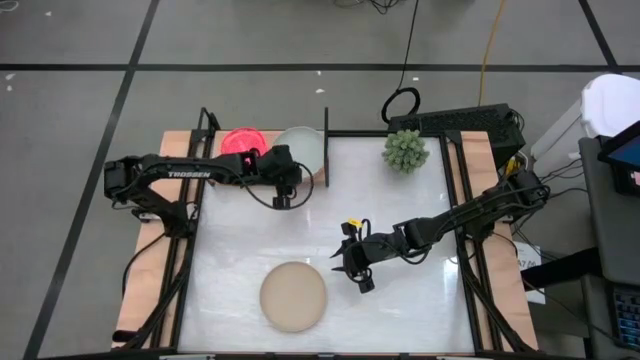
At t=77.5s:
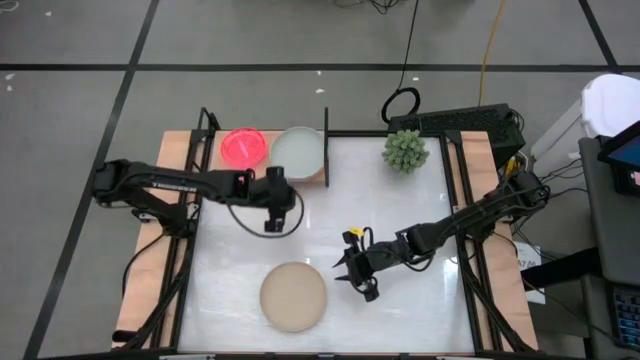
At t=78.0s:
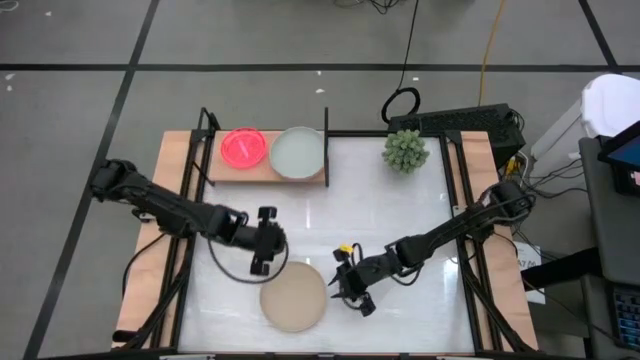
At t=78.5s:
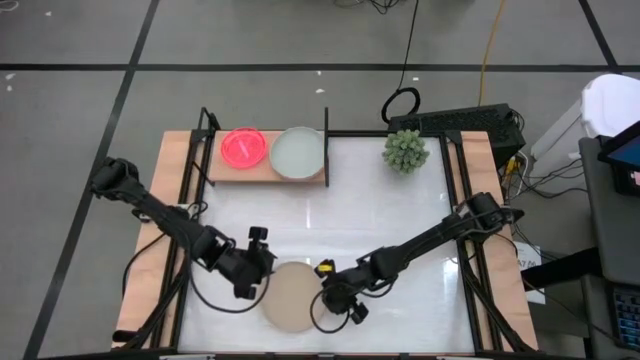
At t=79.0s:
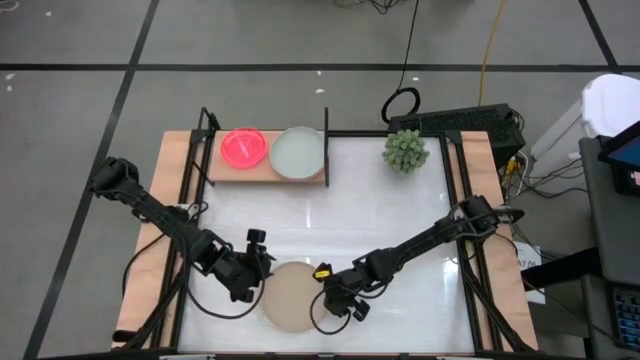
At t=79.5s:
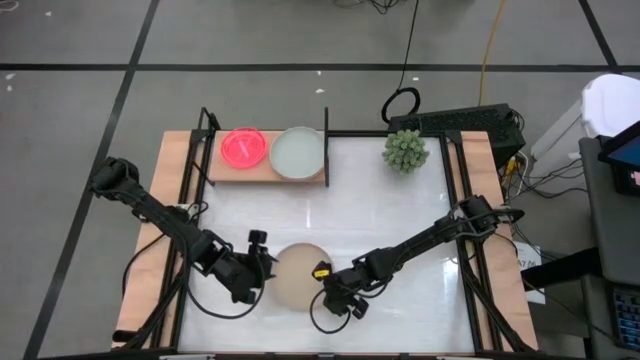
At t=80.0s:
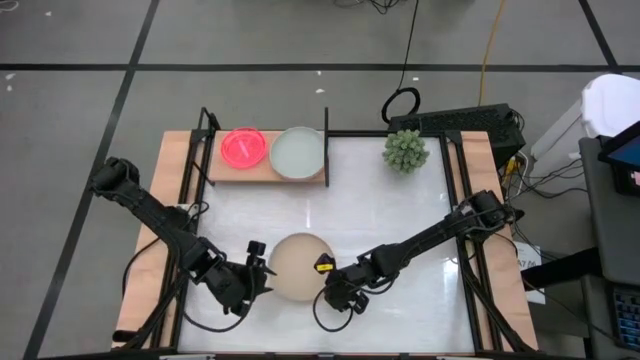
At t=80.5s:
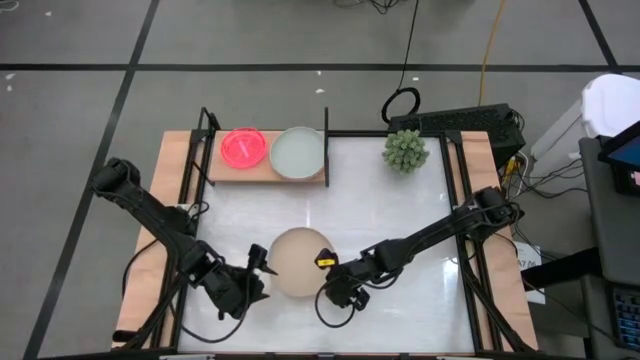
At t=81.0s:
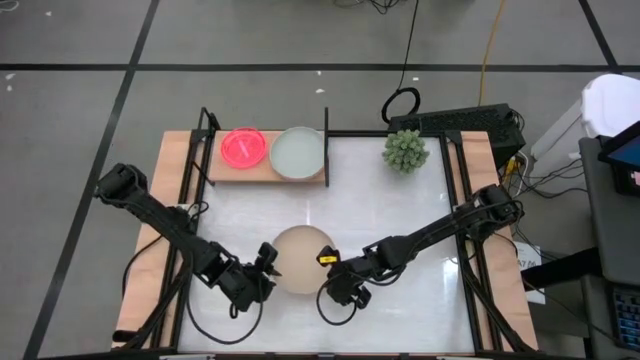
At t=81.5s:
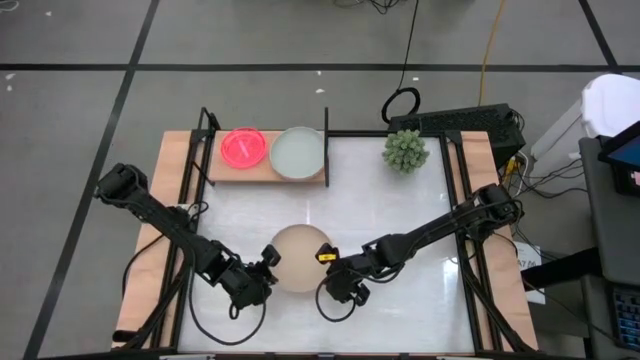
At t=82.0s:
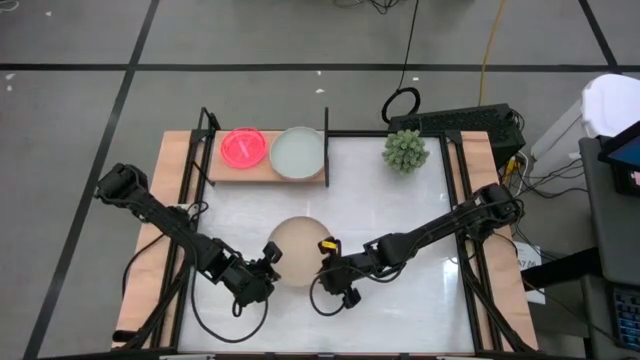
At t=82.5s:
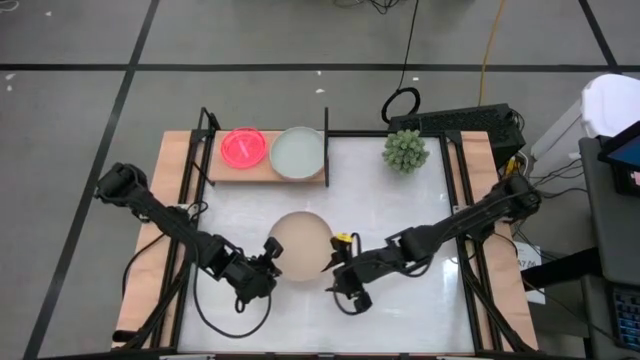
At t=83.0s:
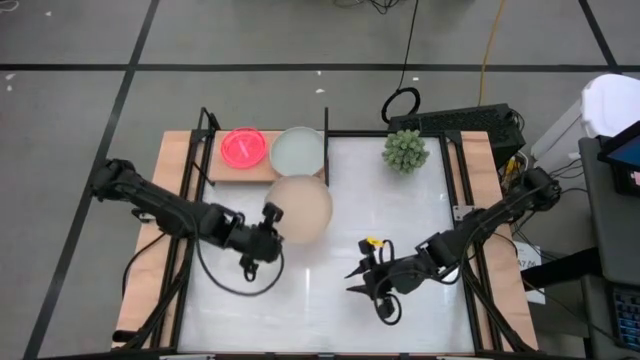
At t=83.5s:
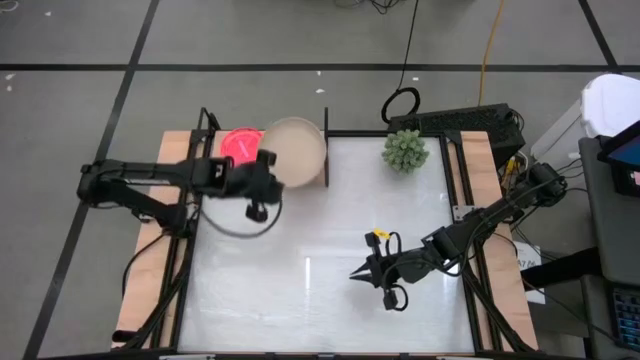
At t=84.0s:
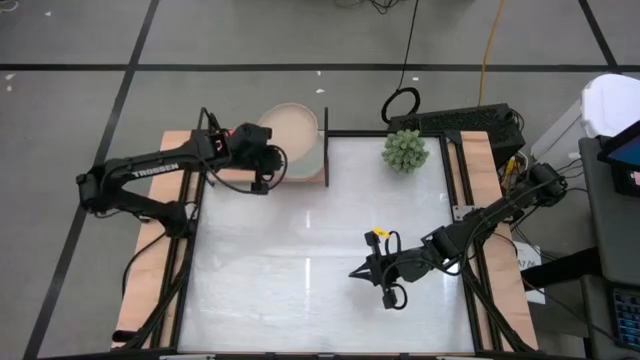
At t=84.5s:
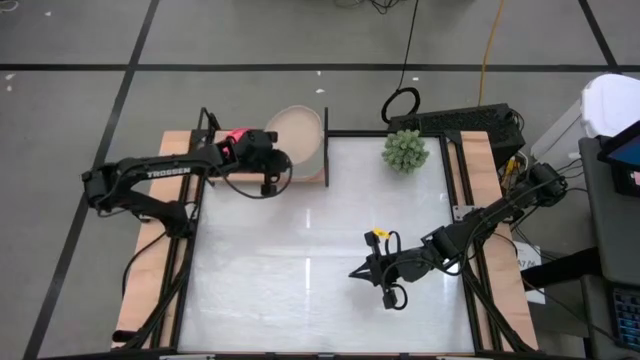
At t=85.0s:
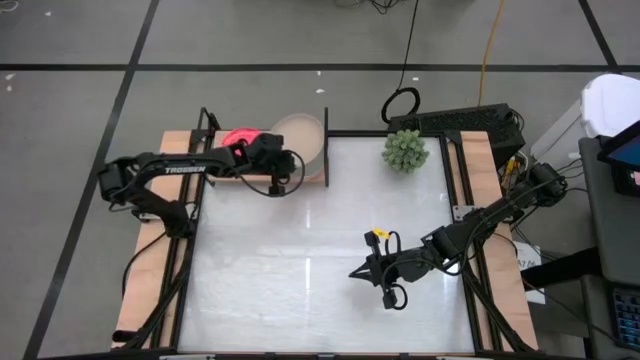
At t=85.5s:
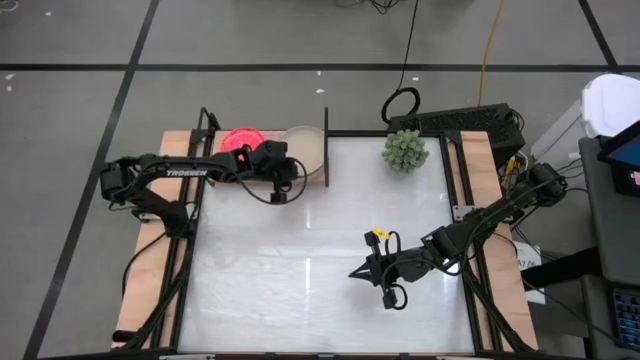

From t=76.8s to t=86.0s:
Task: Place and stack plates onto a shelf
Stack the light brown plate on top of the gray plate on the shelf

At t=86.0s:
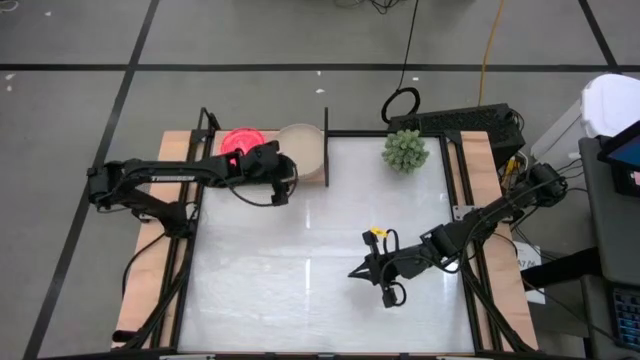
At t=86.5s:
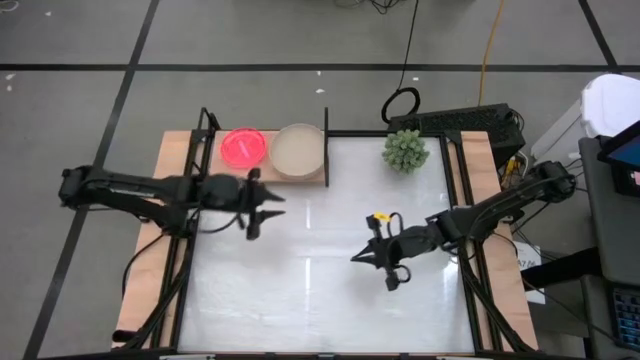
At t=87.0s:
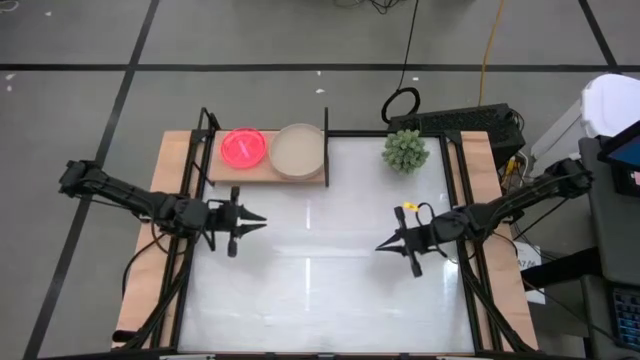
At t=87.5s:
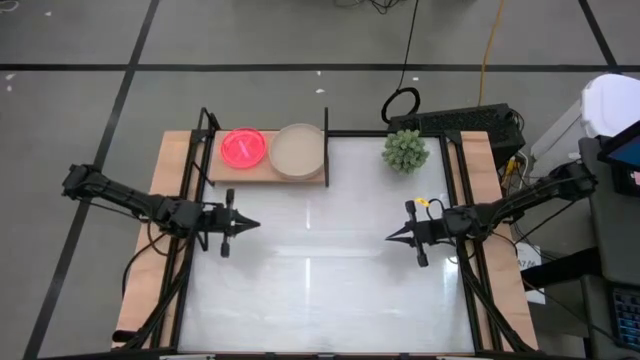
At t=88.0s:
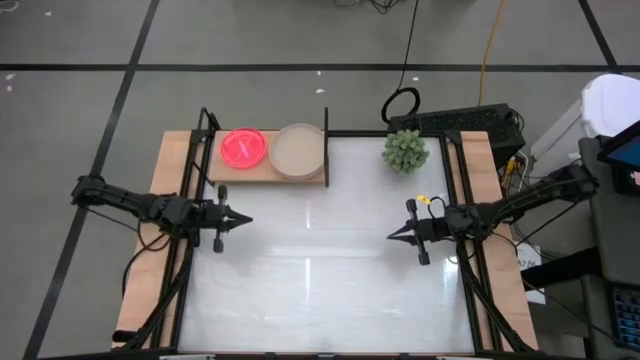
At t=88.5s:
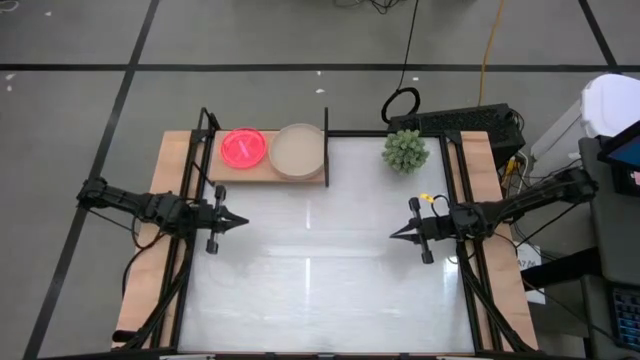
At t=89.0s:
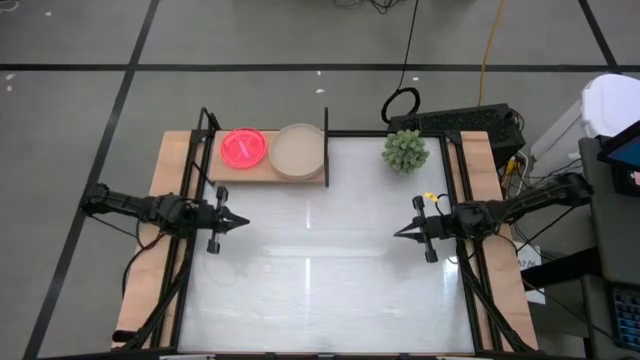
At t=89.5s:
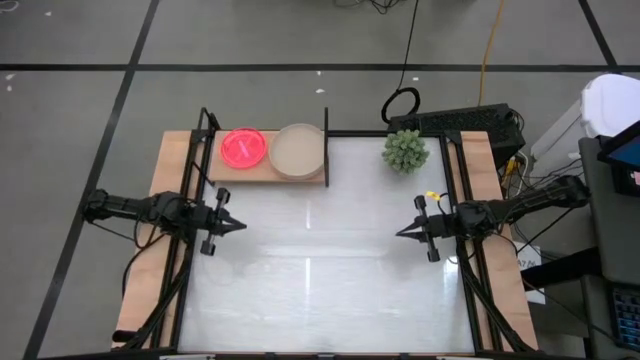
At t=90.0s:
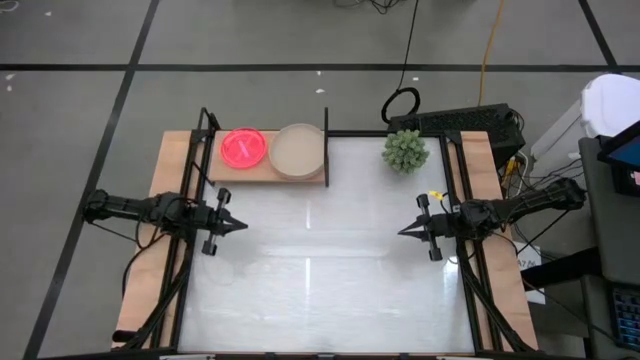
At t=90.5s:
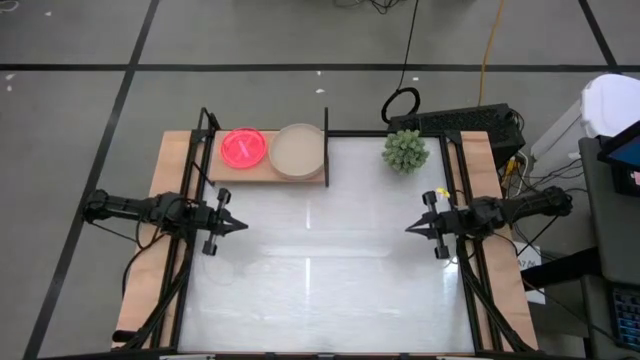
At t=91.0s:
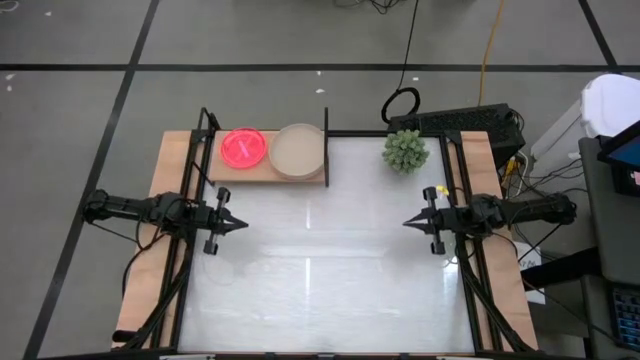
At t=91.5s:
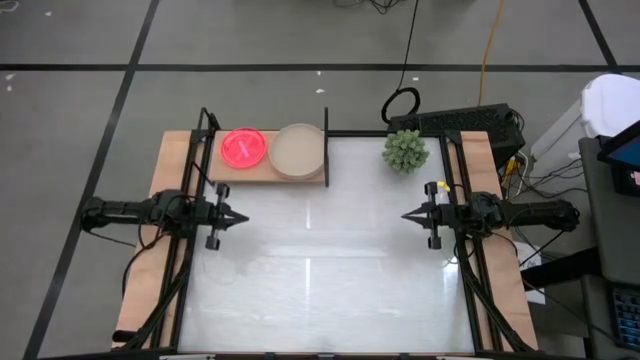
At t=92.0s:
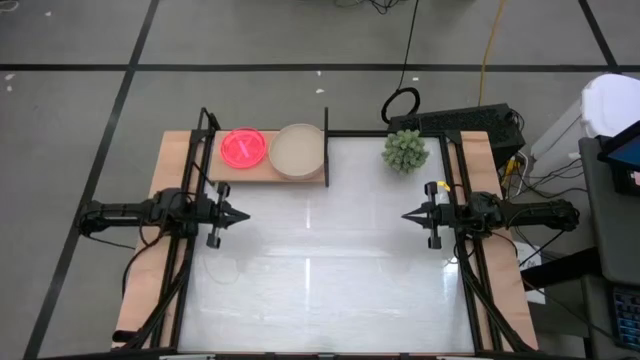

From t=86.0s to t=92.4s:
Return to Home Position

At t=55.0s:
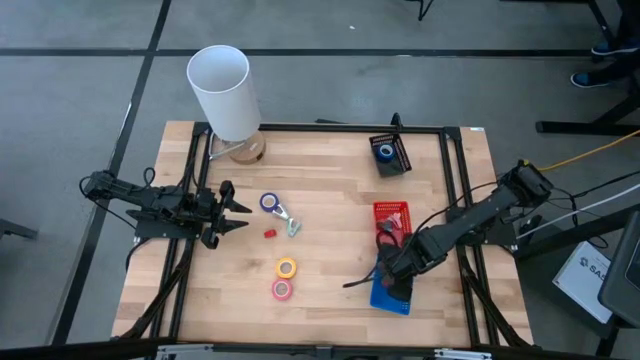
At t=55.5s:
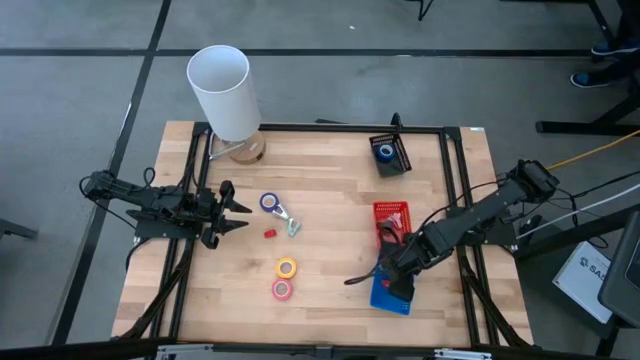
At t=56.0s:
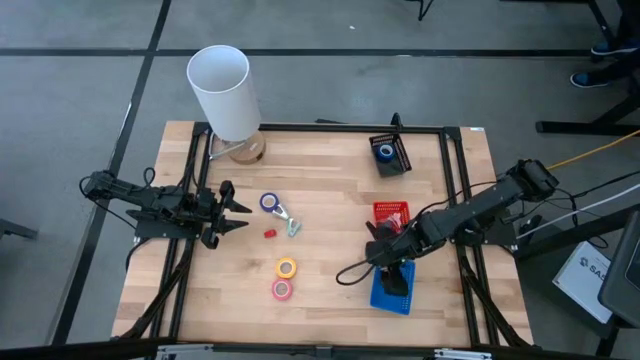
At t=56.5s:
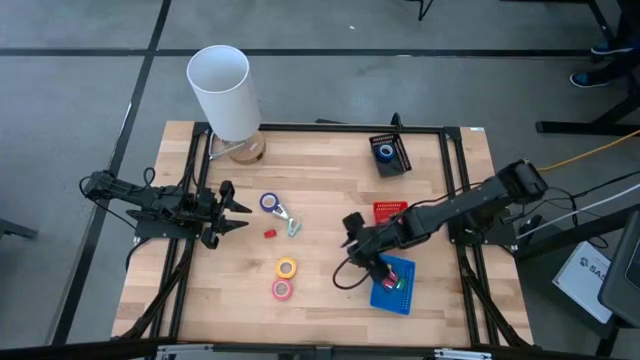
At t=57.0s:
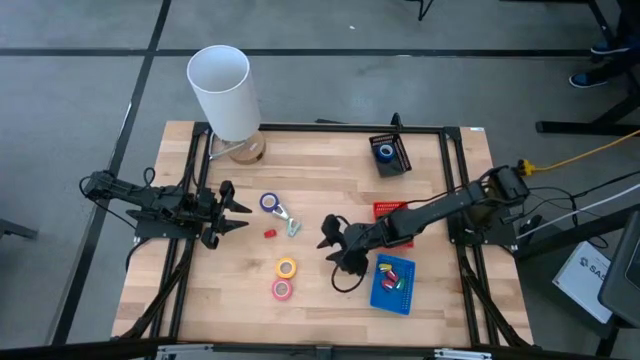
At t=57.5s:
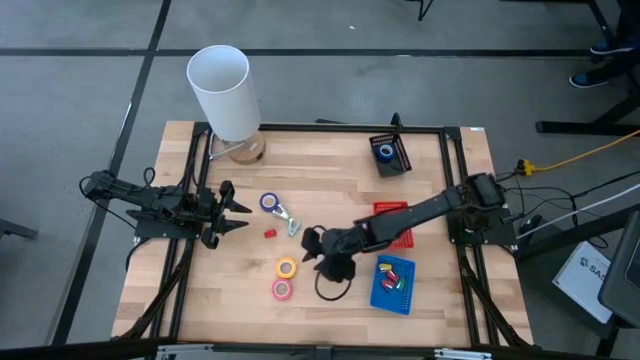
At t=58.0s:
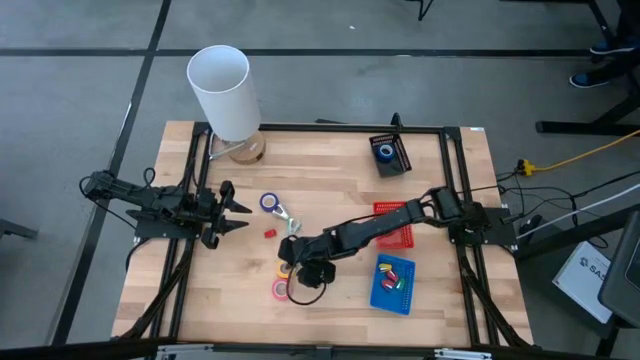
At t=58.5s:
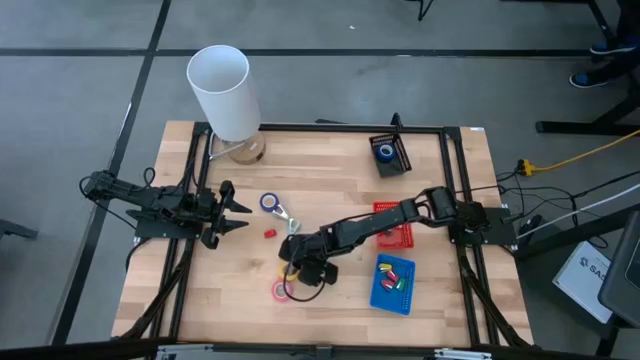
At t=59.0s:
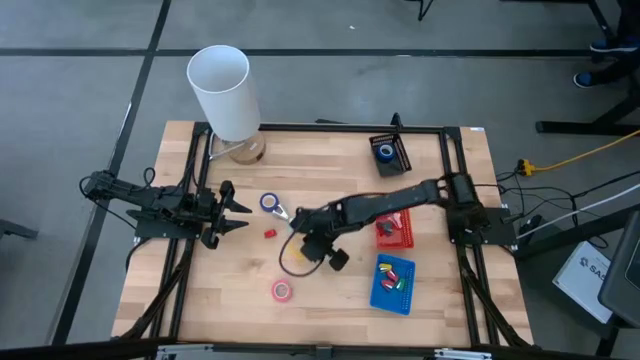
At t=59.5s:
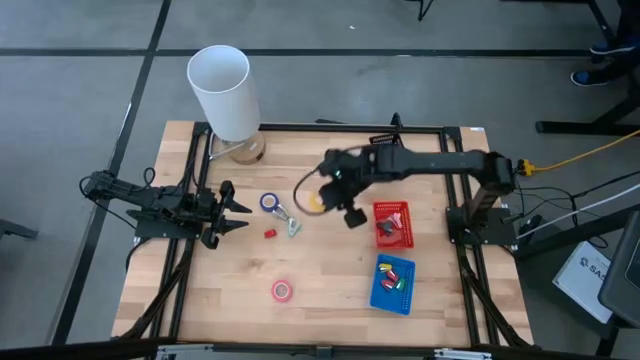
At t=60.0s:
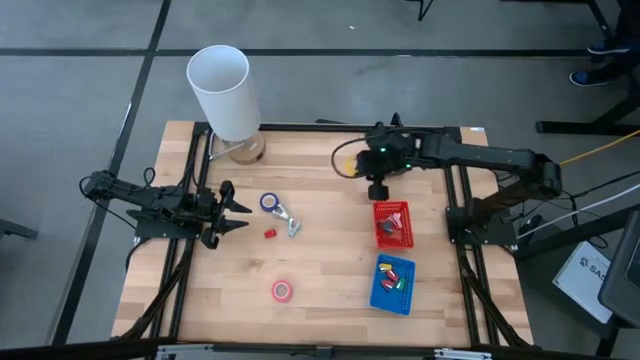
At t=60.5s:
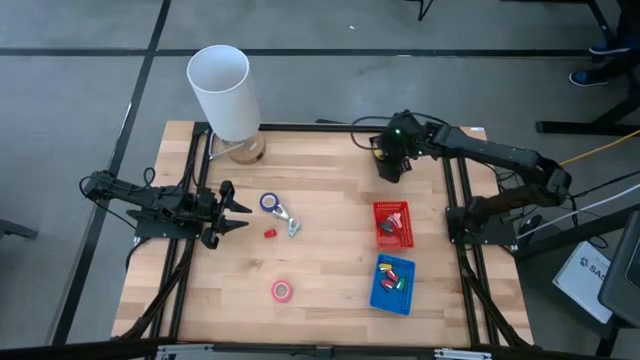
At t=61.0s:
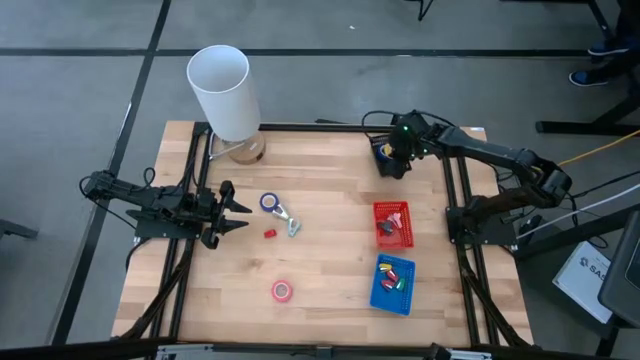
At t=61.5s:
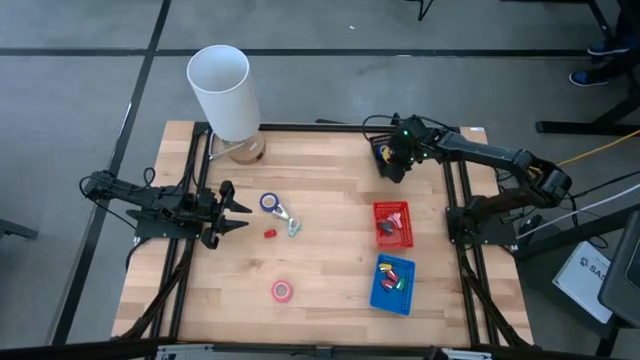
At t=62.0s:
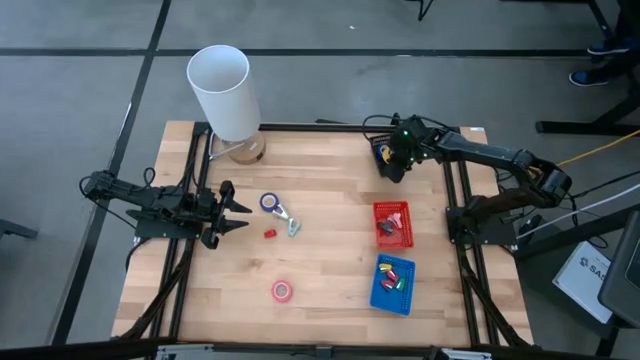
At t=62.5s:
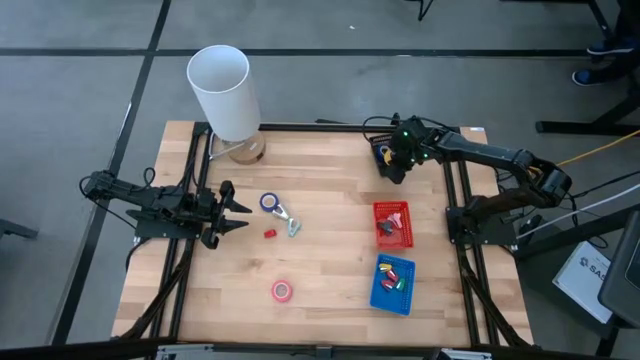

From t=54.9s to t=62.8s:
Task: Pick and place Stapler, Stapler remover, tape
Put the yellow tape into the black basket
